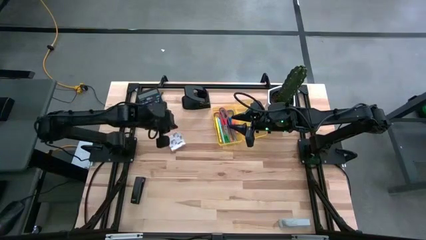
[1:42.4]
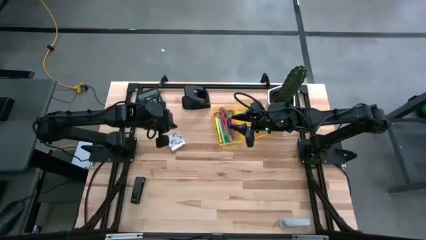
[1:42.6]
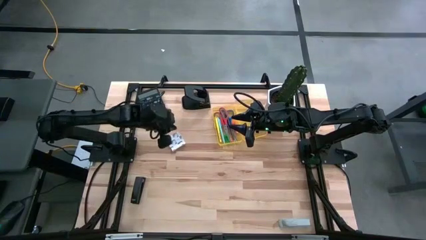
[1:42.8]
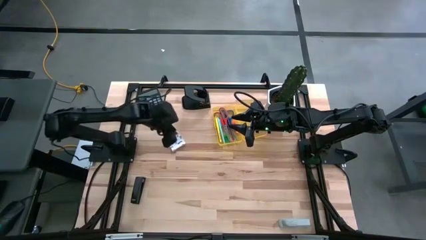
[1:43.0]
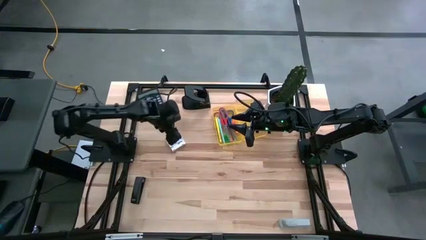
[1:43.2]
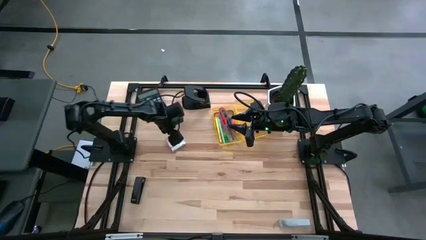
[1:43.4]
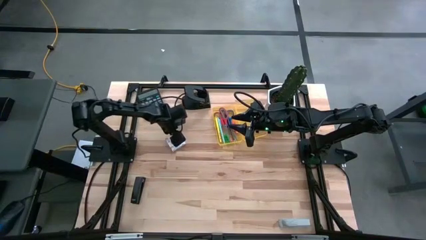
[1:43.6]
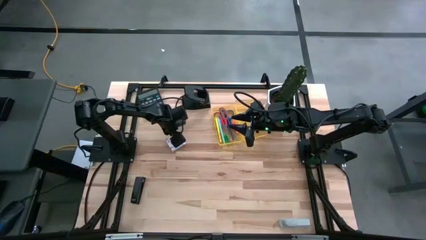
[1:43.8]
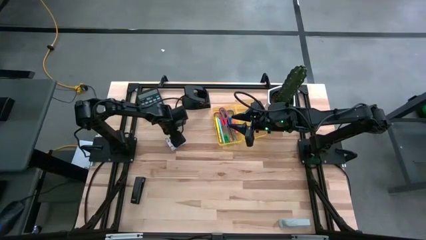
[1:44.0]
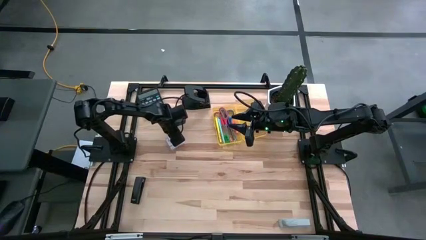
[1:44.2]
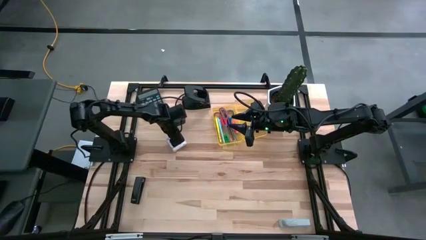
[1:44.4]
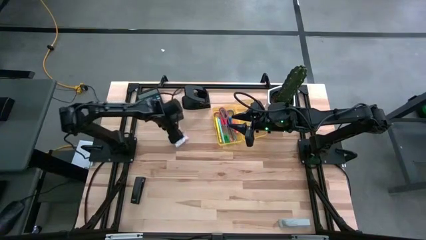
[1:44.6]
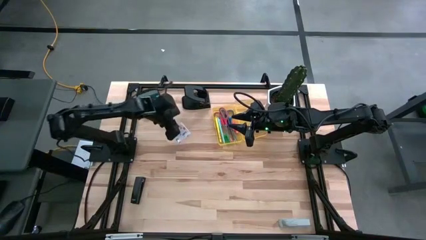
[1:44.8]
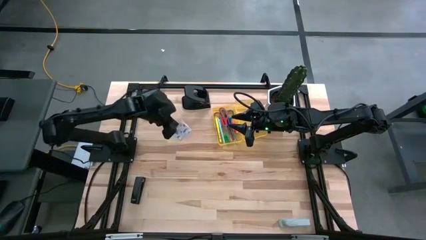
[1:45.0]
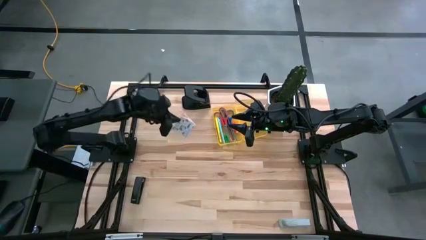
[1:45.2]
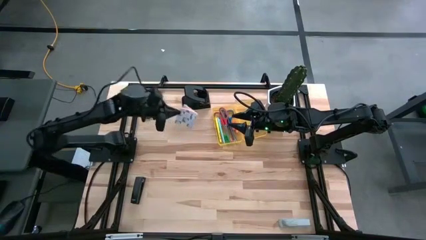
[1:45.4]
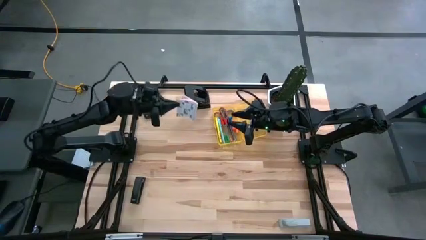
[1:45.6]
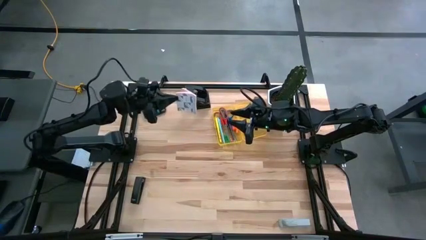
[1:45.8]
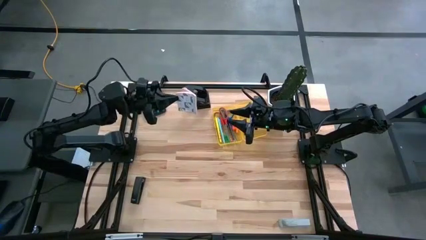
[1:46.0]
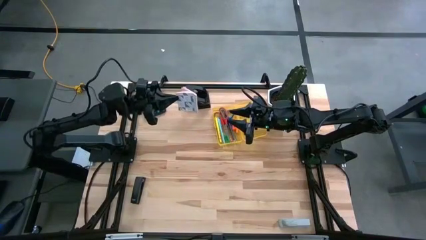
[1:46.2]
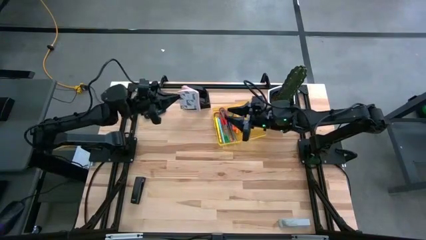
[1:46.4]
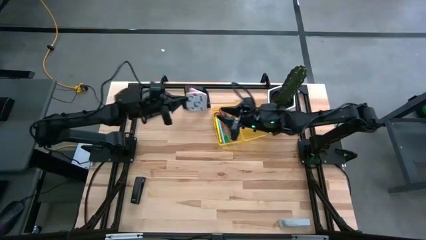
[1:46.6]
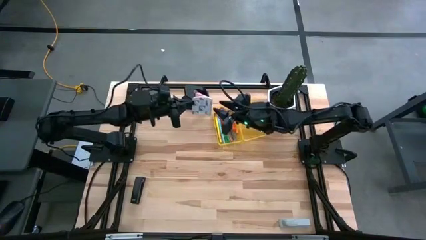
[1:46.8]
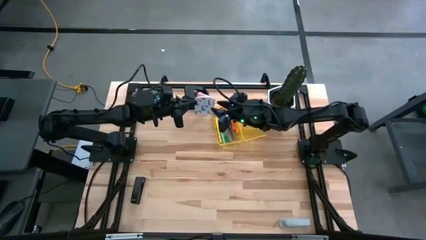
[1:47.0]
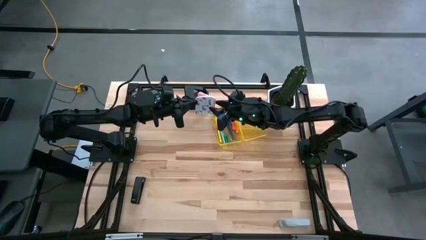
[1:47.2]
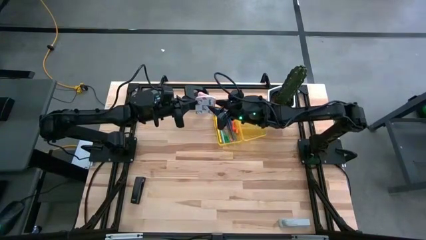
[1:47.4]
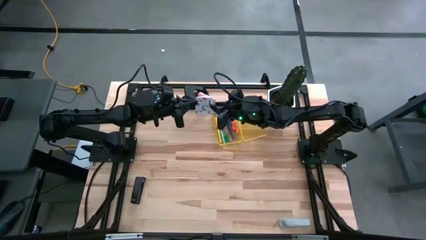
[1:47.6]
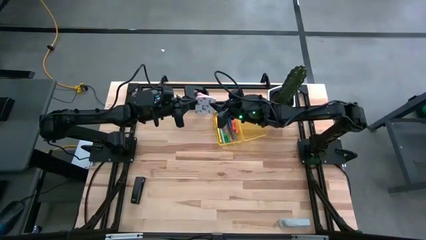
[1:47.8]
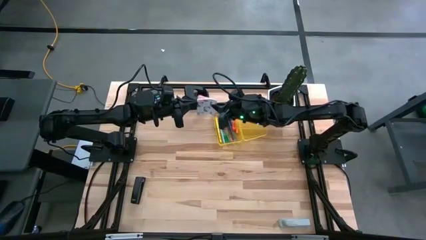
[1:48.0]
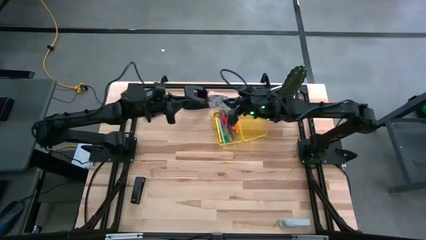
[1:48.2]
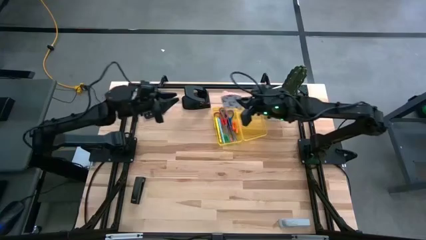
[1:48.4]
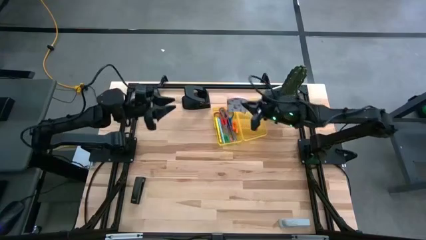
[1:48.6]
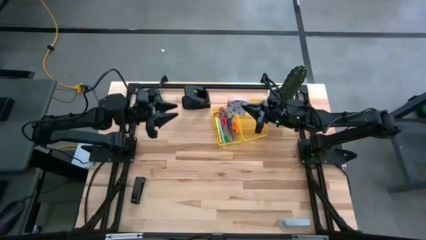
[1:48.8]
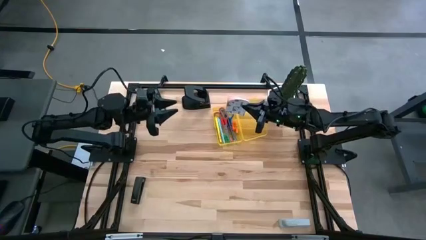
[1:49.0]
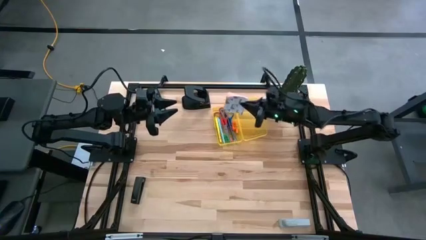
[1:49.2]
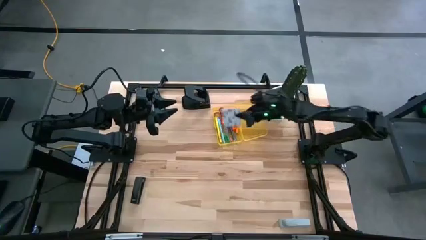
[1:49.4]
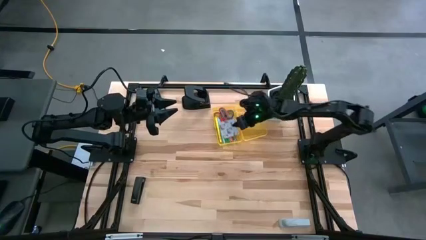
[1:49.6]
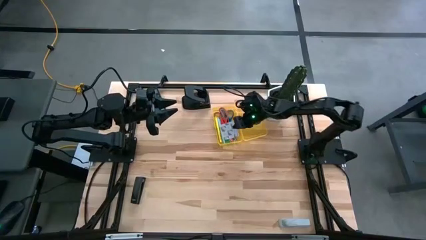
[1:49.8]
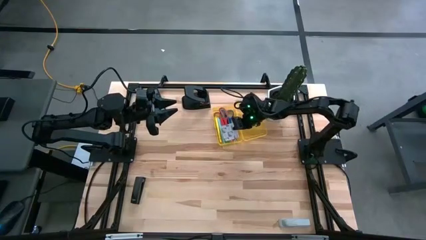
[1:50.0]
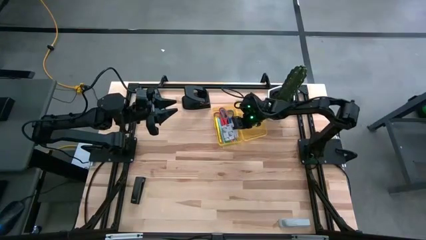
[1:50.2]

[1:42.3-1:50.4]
Task: Pack school essentials
Put the pink sticky notes into the yellow supply box

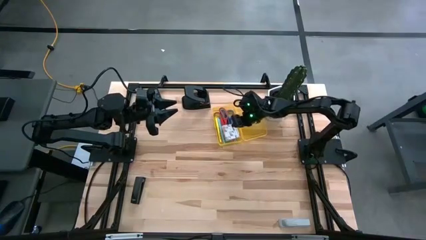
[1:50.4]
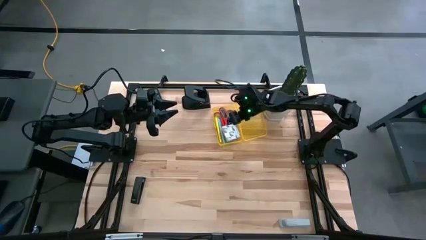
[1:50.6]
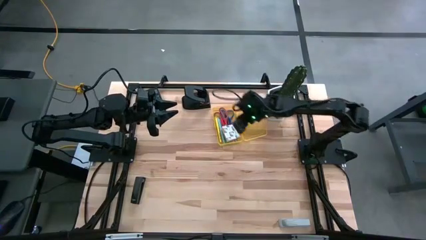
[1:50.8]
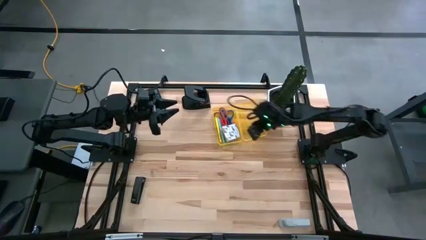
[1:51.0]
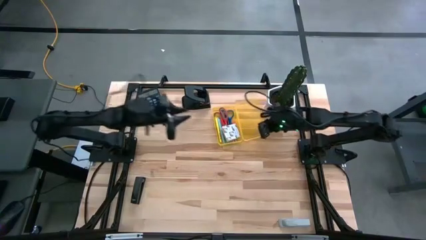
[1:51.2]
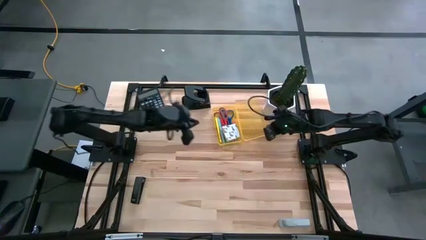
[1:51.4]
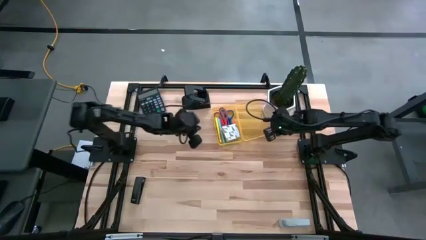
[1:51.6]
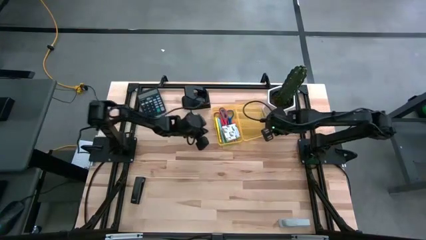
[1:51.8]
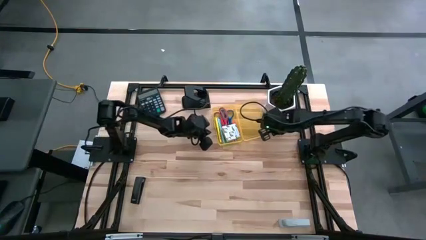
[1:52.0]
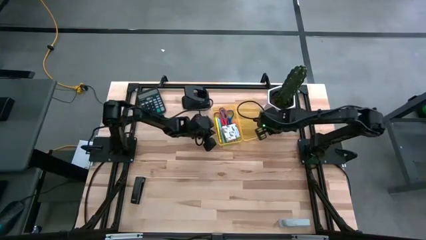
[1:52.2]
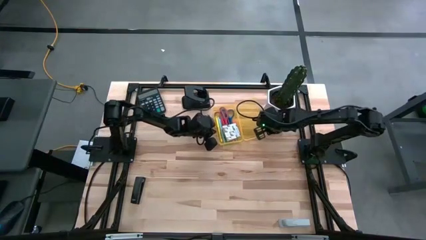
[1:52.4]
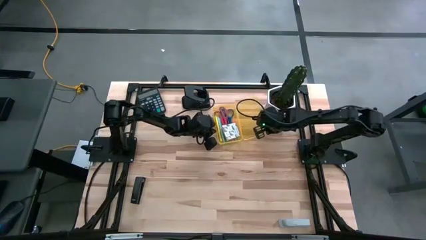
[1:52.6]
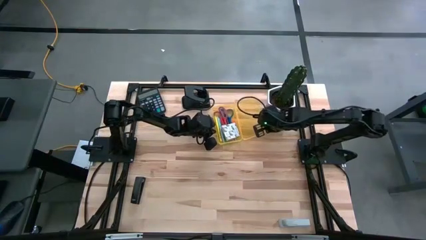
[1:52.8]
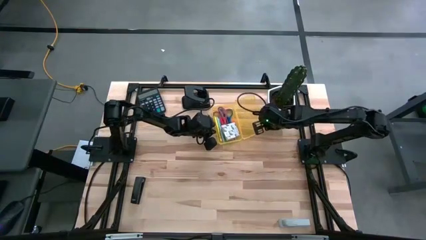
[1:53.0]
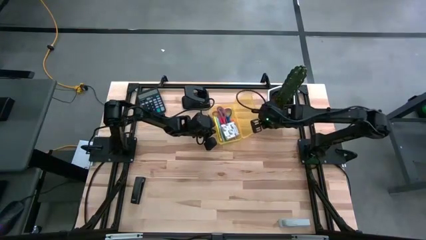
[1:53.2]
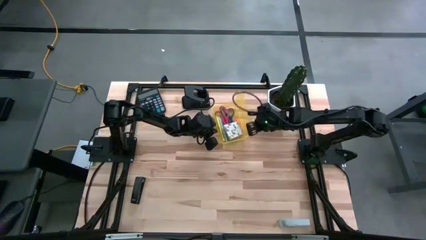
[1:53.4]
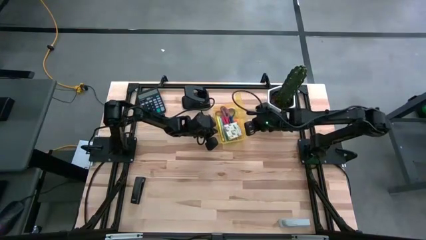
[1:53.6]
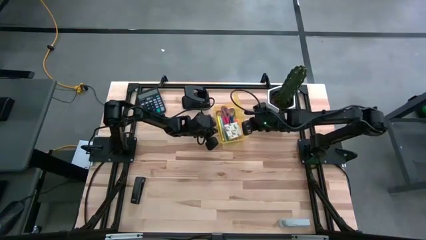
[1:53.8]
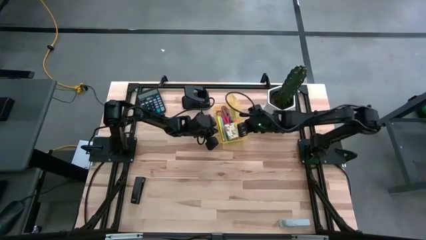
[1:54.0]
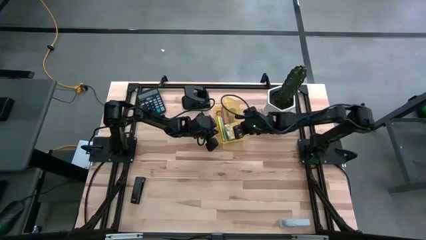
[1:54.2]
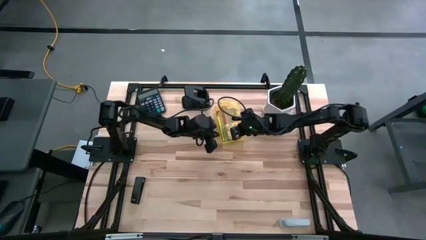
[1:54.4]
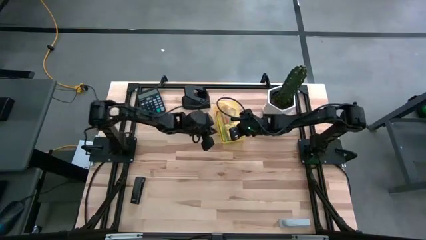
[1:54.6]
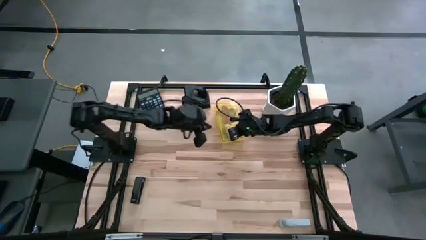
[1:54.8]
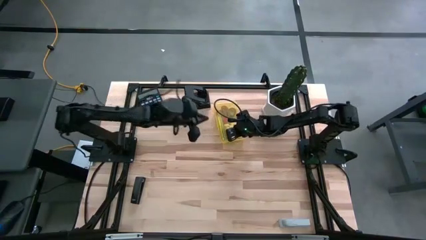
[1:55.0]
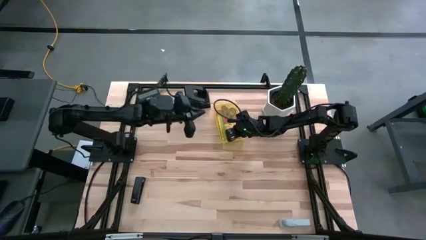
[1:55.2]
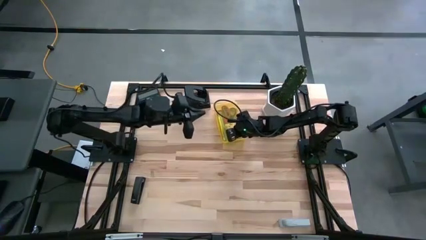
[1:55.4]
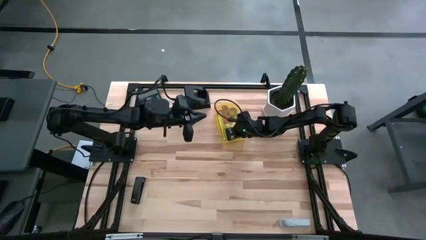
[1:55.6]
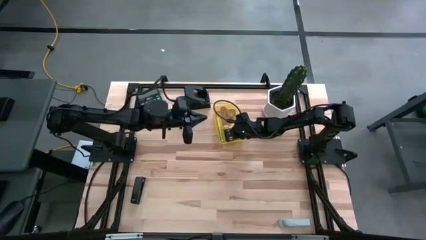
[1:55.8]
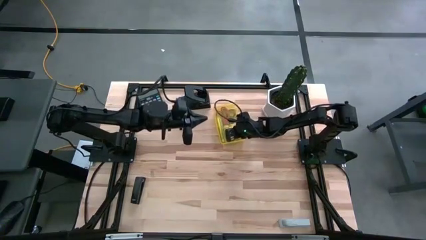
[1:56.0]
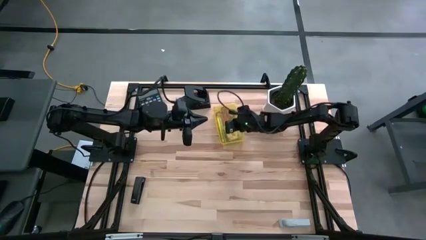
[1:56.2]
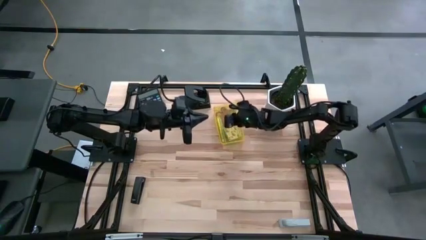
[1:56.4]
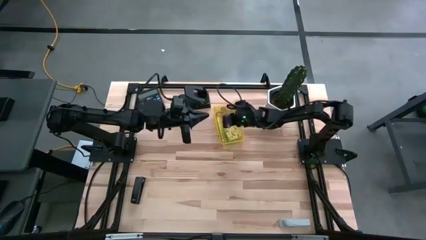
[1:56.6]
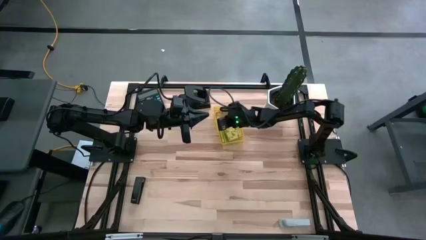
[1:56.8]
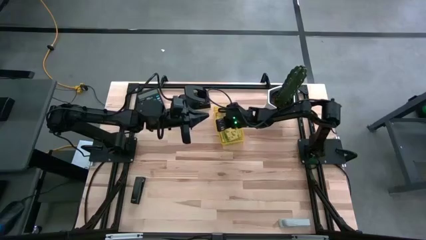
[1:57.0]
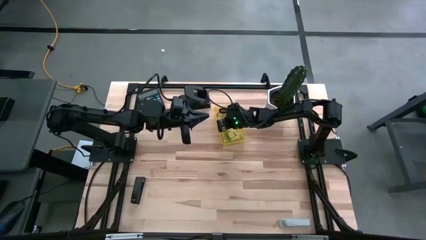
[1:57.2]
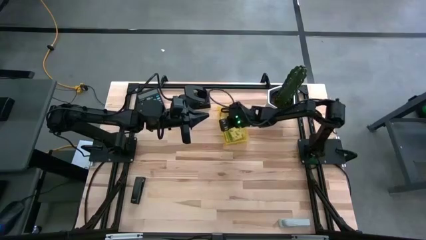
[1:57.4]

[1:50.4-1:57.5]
Close the yellow supply box

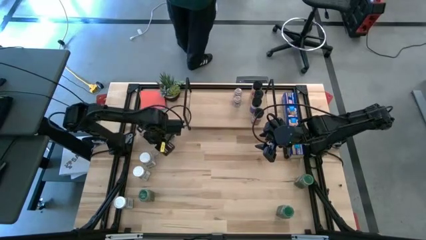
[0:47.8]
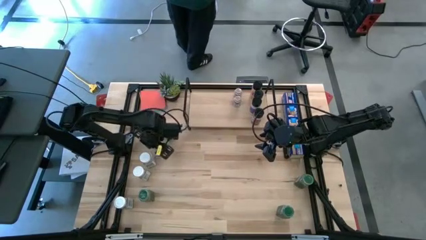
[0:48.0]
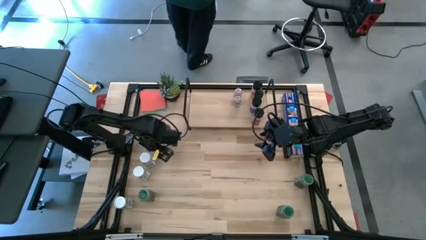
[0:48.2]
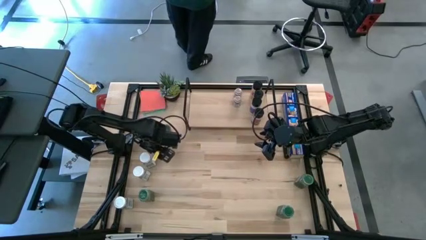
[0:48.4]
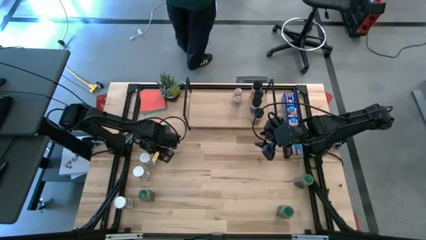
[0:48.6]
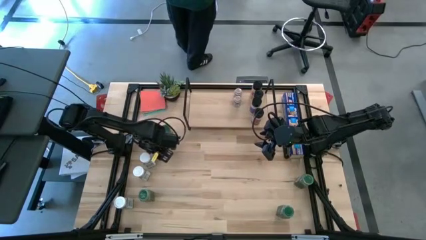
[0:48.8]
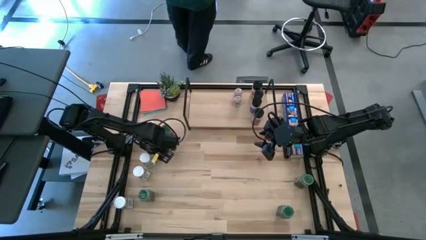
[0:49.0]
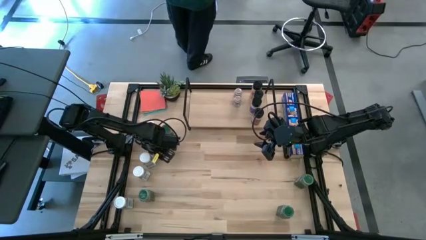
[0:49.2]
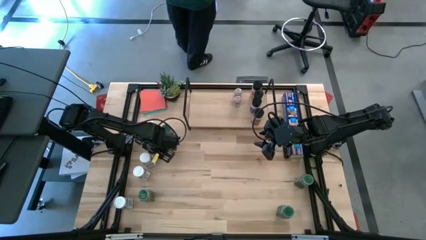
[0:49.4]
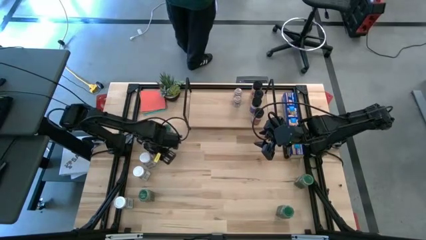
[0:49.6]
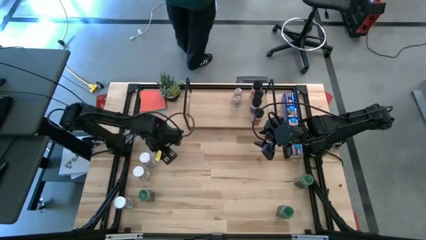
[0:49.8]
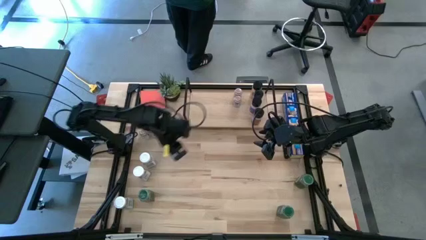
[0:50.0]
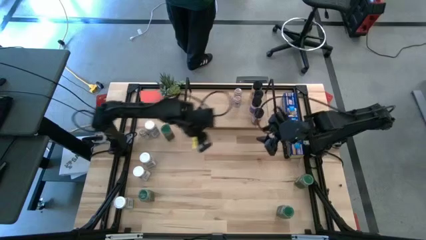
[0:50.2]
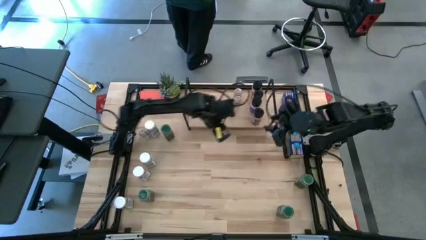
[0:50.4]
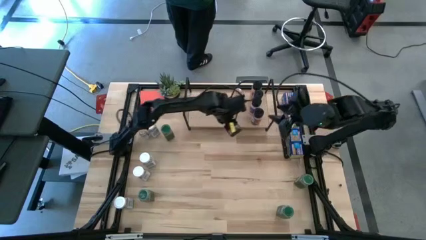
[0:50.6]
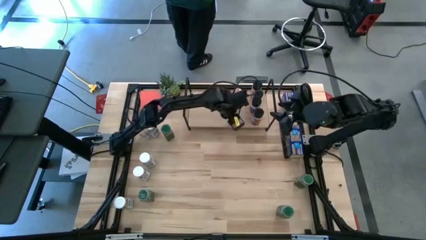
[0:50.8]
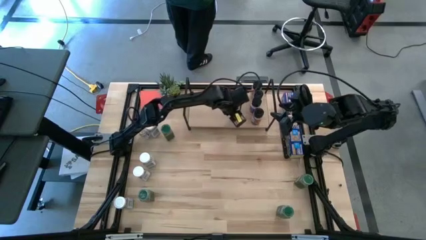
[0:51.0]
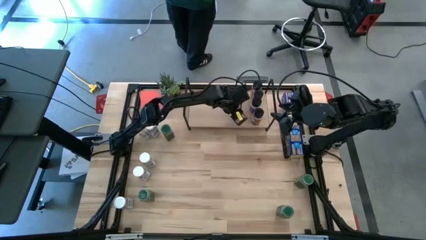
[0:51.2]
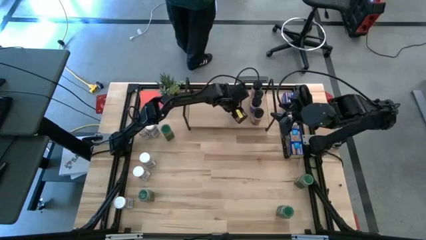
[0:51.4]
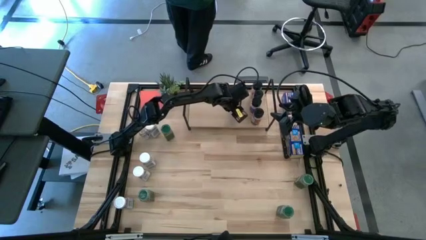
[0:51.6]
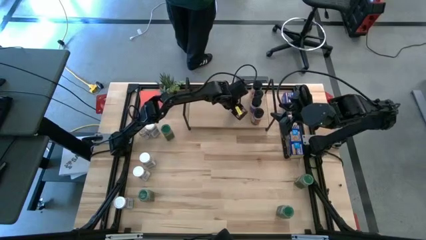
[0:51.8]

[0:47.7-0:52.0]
Task: Shelf spices
Put the brown seasoning bottle on the shelf, aligned with the other brown seasoning bottle
